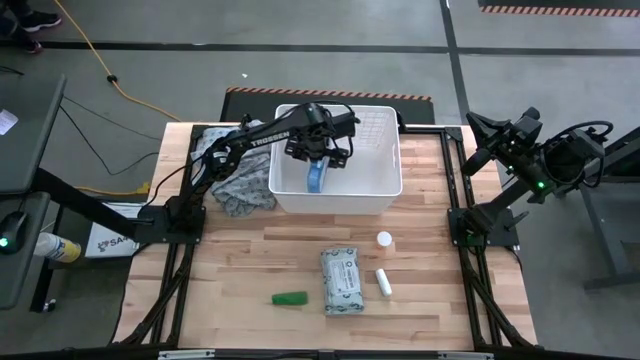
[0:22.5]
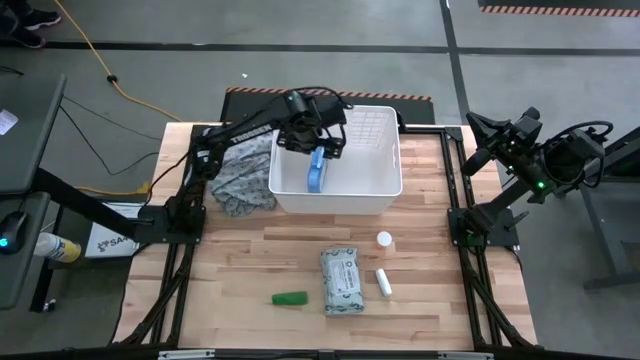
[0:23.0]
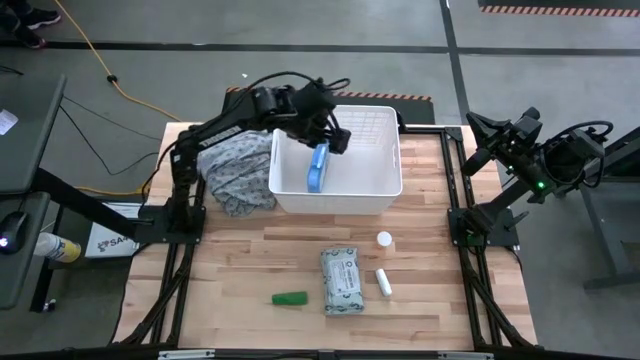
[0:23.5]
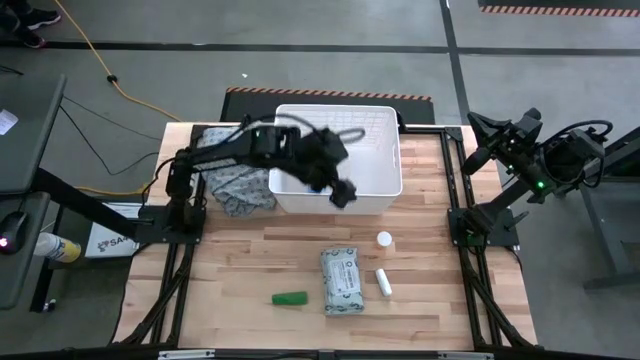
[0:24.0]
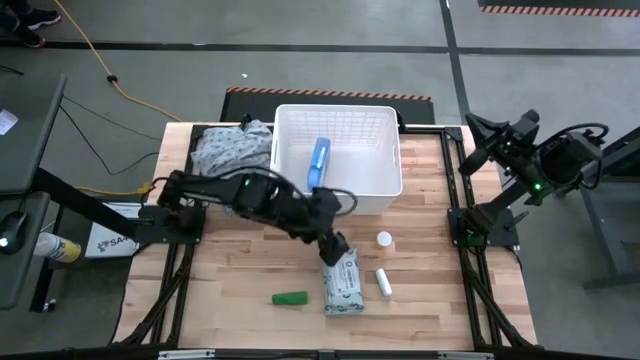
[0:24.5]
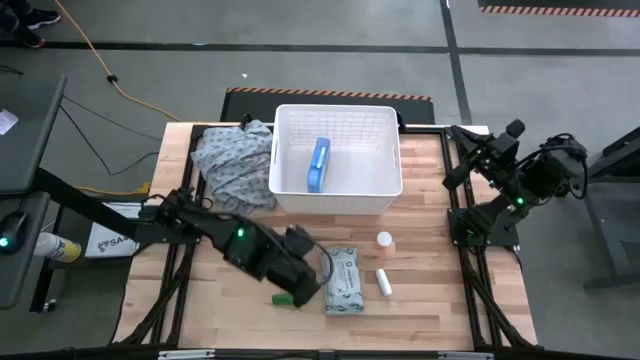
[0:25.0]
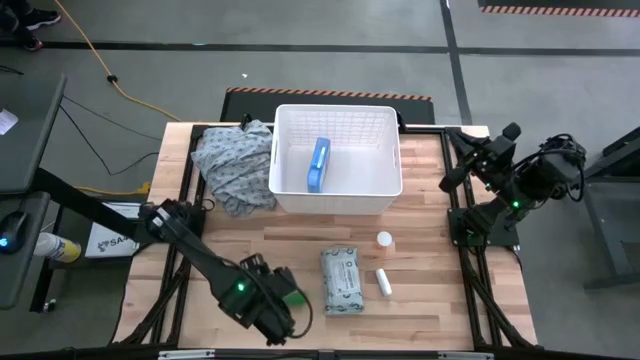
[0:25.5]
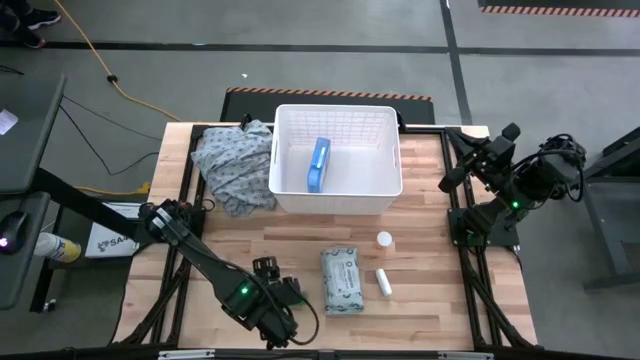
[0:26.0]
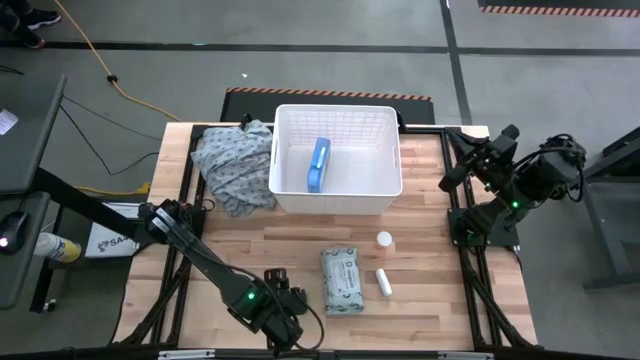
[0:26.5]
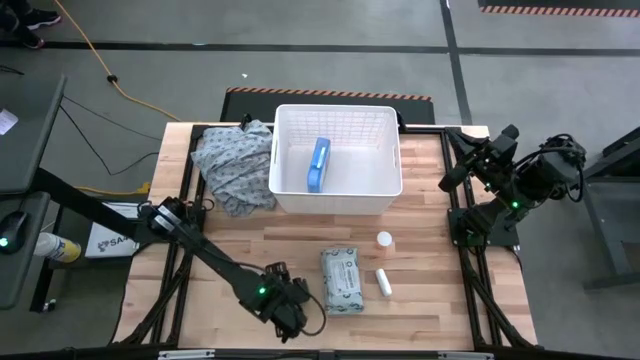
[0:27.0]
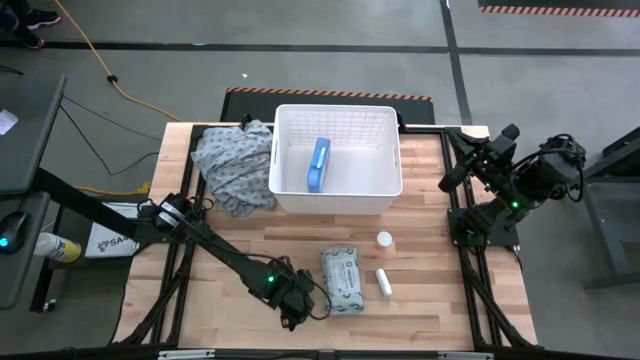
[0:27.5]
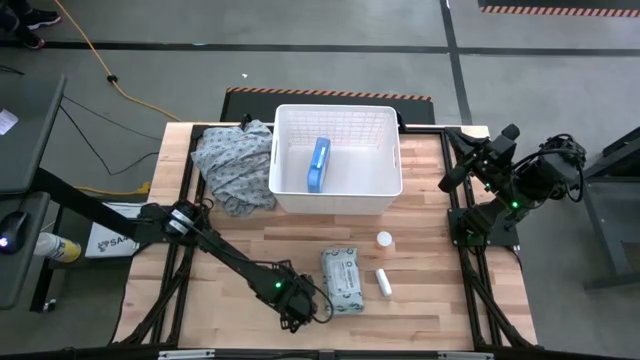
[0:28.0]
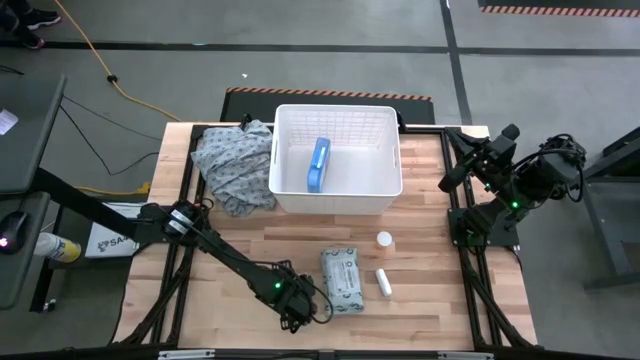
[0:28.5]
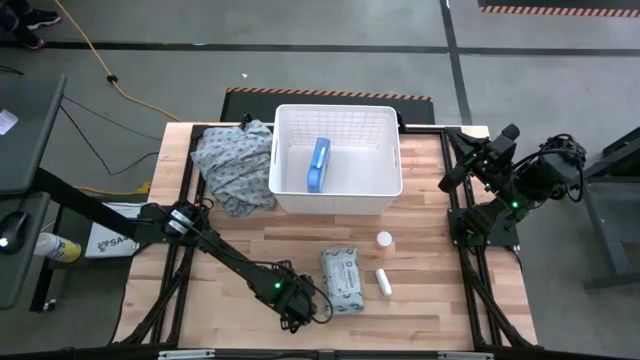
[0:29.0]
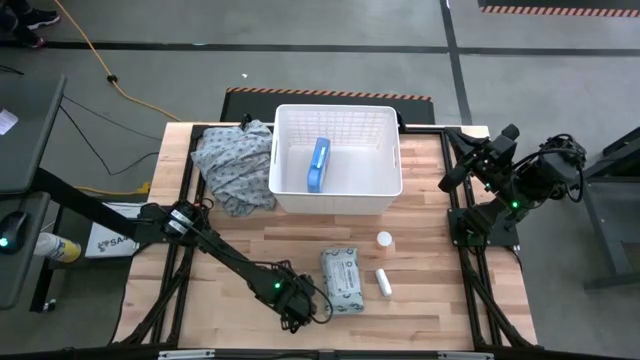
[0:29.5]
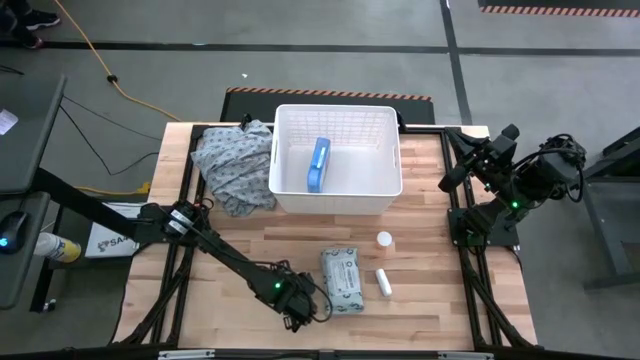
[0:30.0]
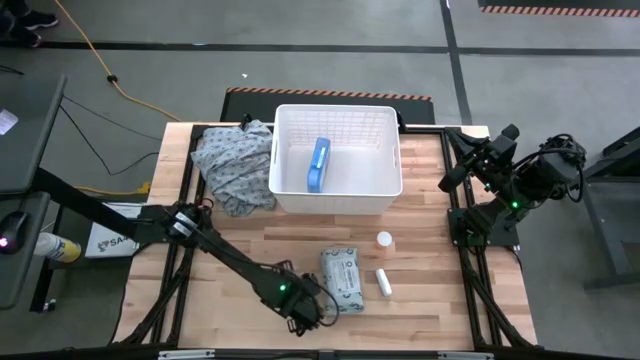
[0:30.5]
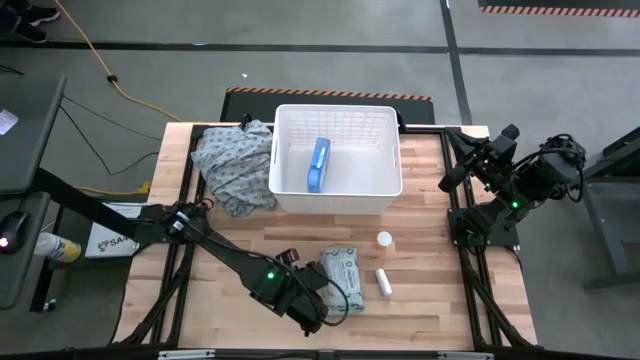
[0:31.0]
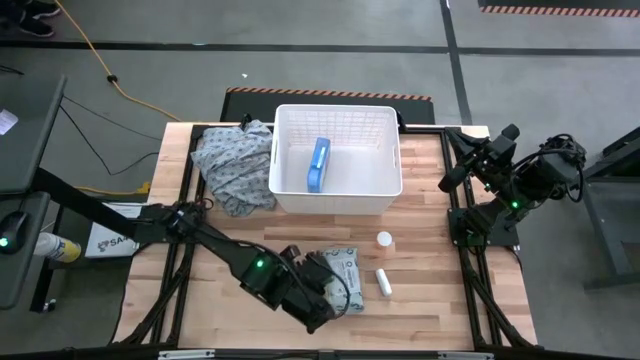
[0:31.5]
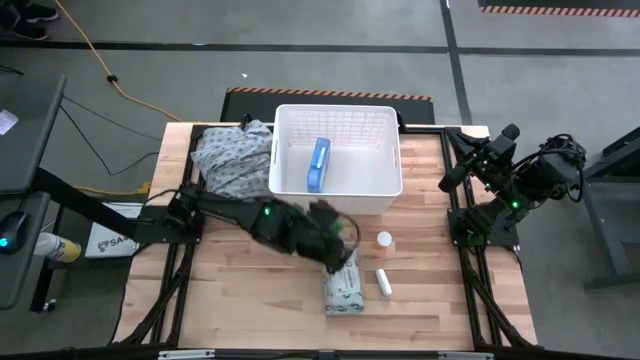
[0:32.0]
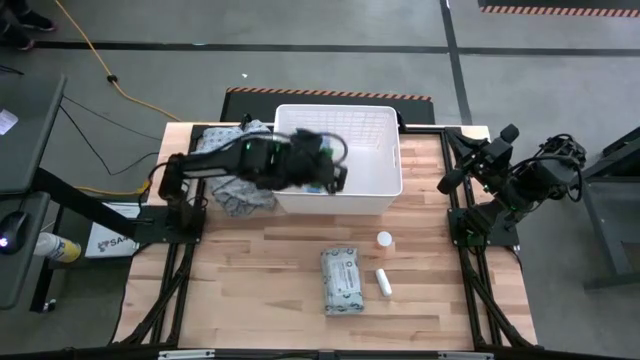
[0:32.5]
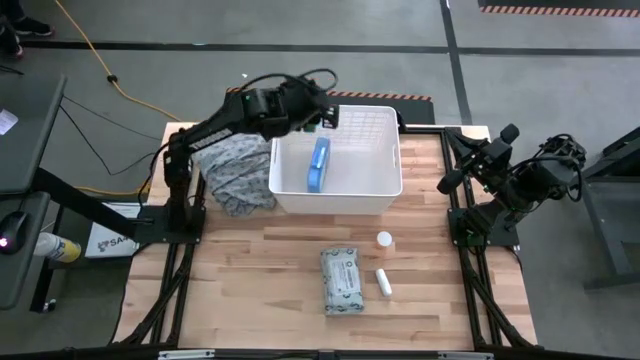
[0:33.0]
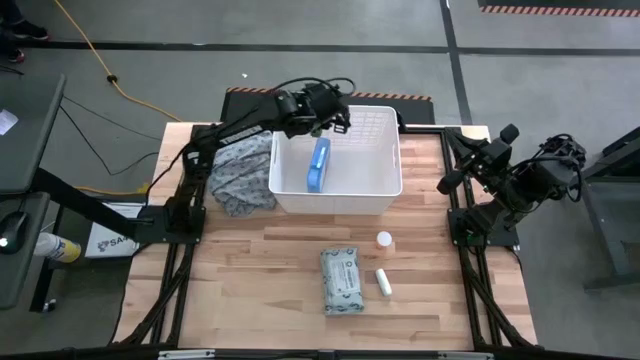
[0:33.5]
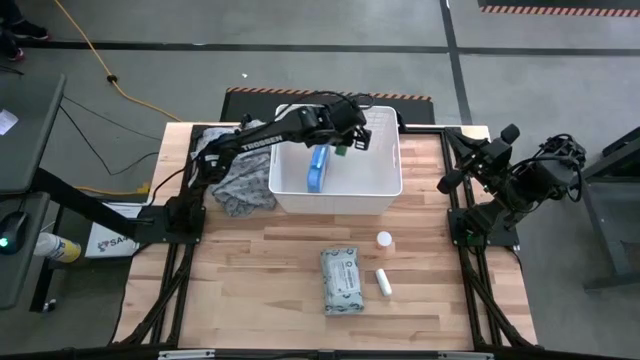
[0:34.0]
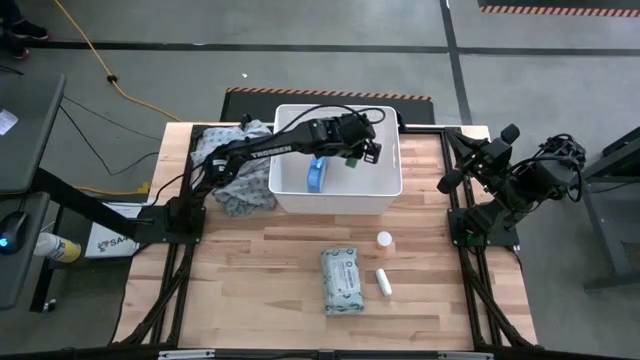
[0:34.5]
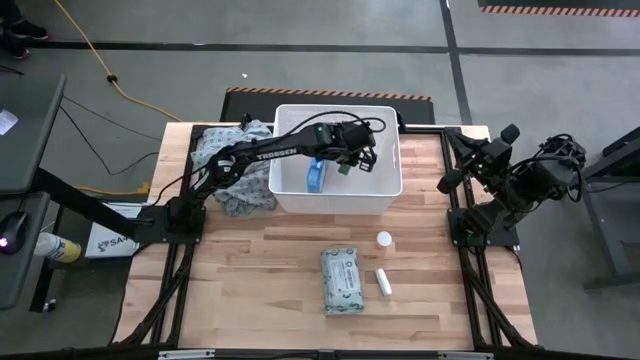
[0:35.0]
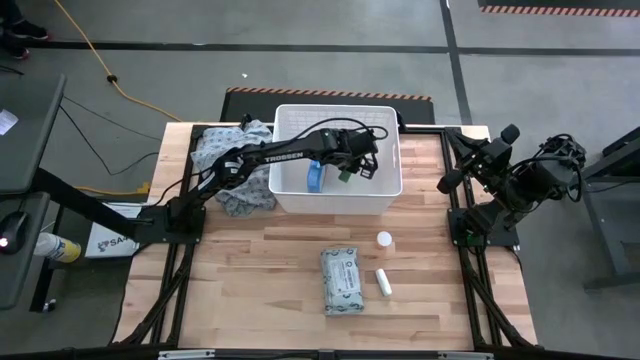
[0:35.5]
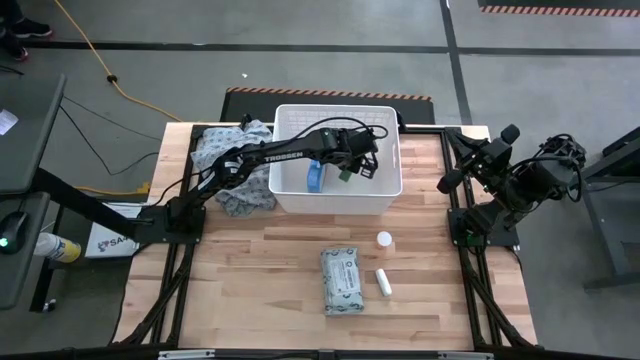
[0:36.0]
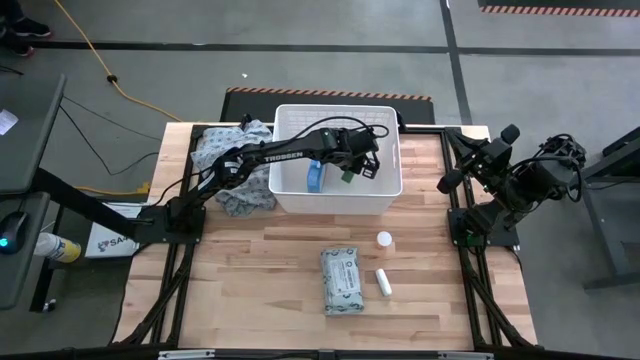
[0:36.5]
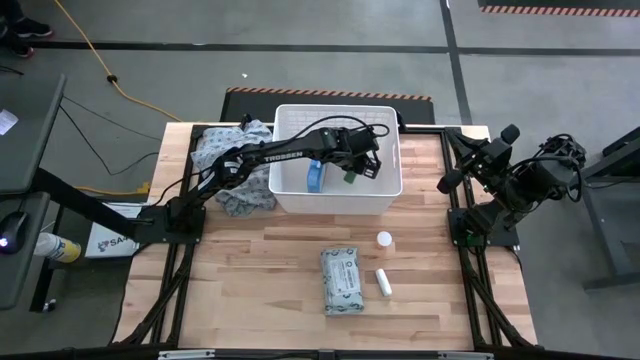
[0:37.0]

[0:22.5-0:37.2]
Task: Pick & place medical supplies in basket/bin
Put the green bandage into the white bin

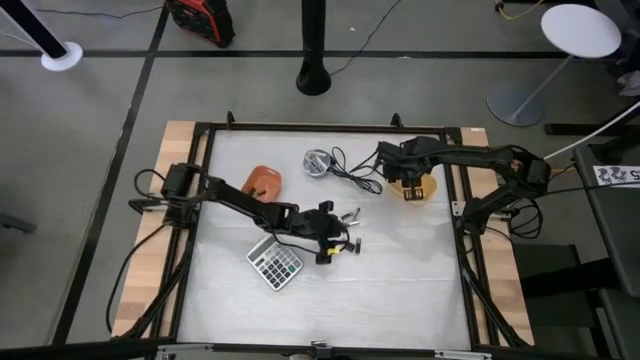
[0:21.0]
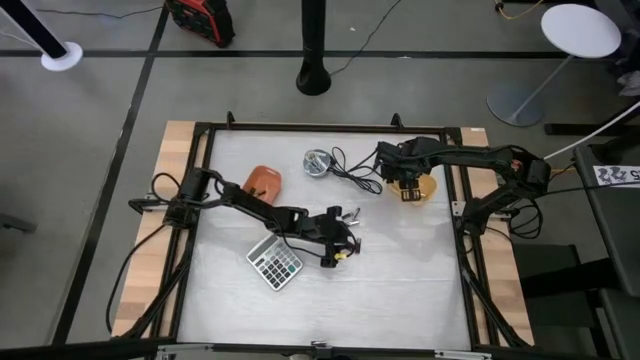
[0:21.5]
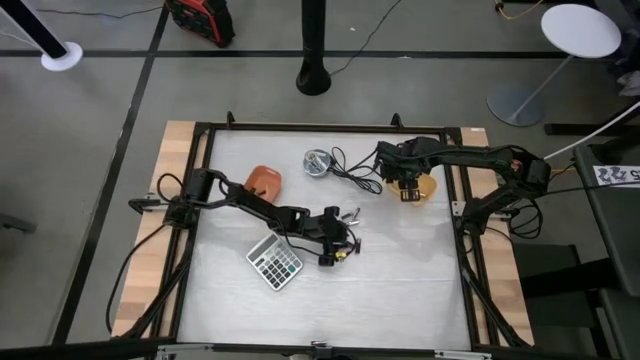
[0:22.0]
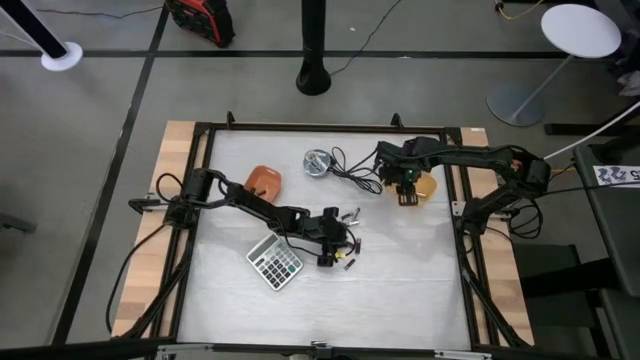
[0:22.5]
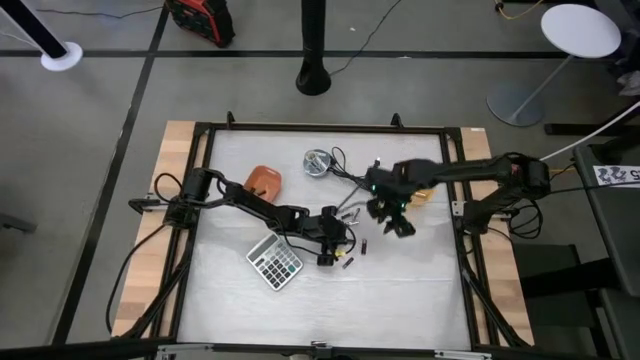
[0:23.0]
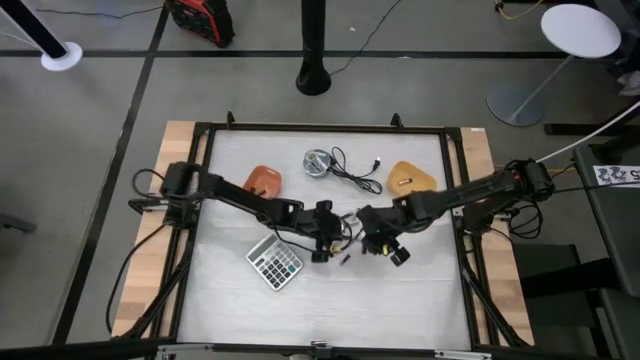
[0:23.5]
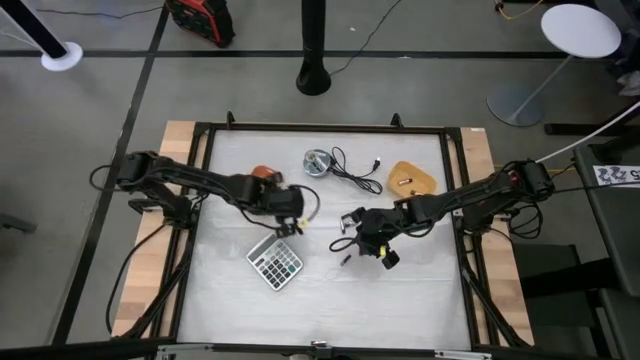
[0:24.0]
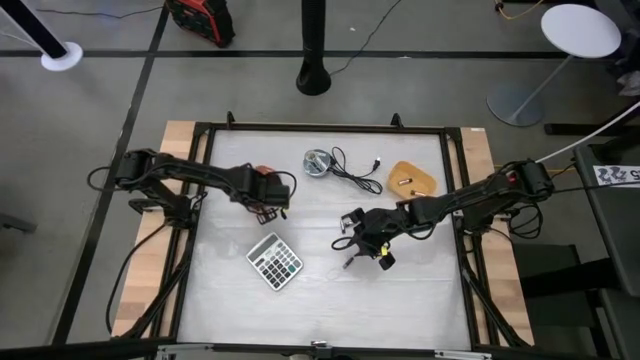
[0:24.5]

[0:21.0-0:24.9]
Task: Sort batteries
Put the black battery into the orange bin

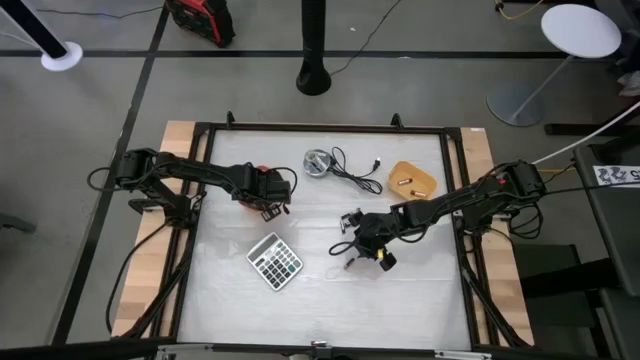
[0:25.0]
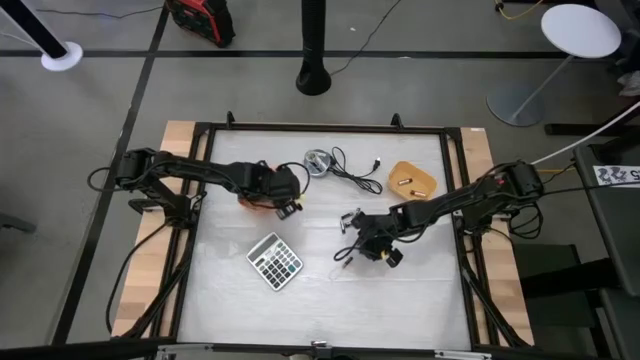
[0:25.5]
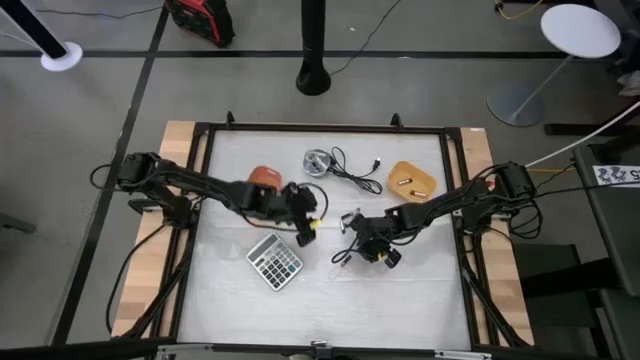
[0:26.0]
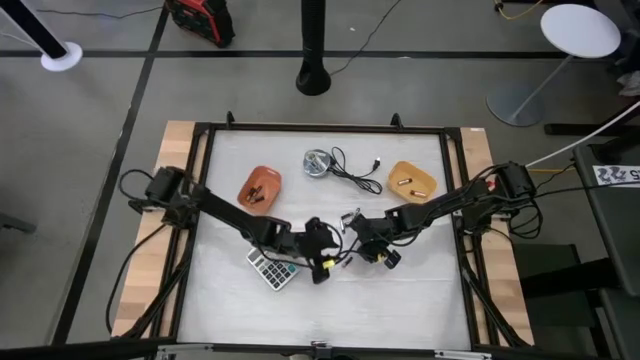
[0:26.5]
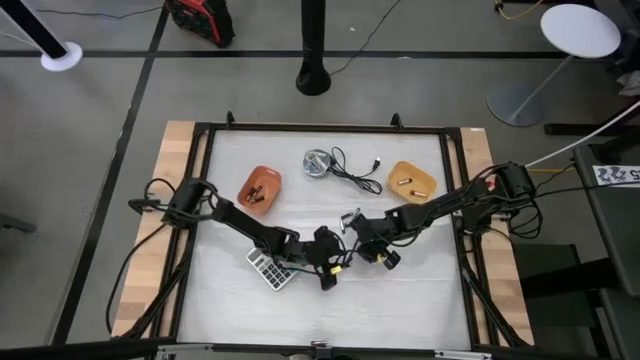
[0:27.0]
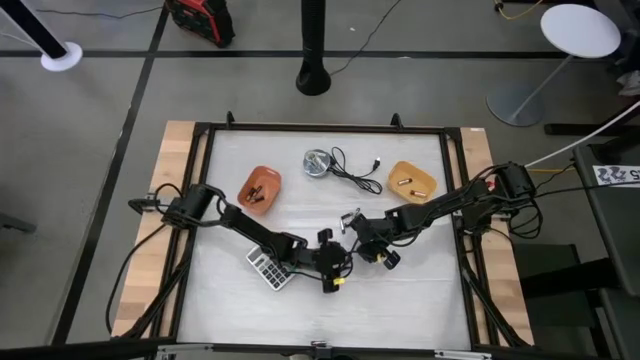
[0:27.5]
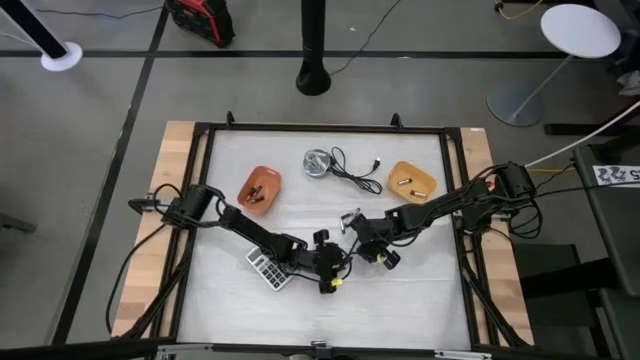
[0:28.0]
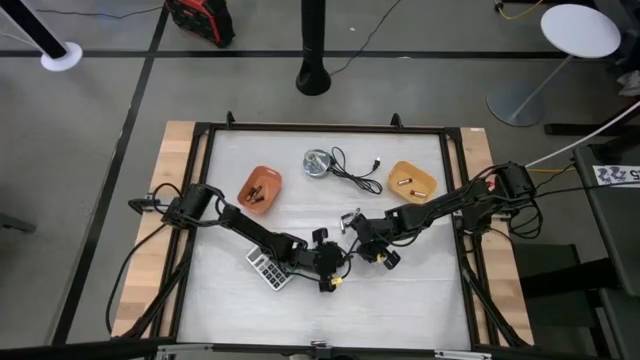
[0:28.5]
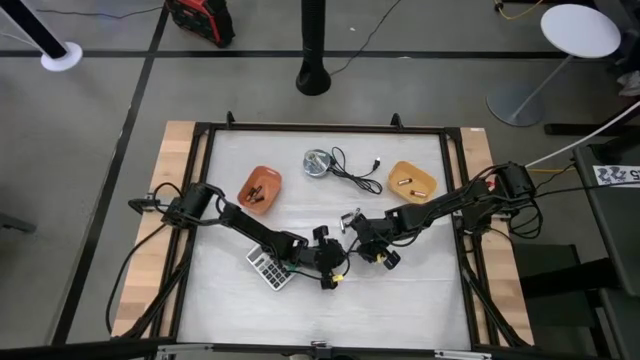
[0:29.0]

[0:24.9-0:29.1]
Put the black battery into the orange bin
